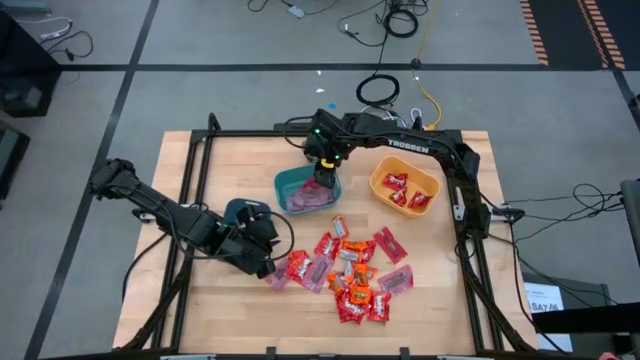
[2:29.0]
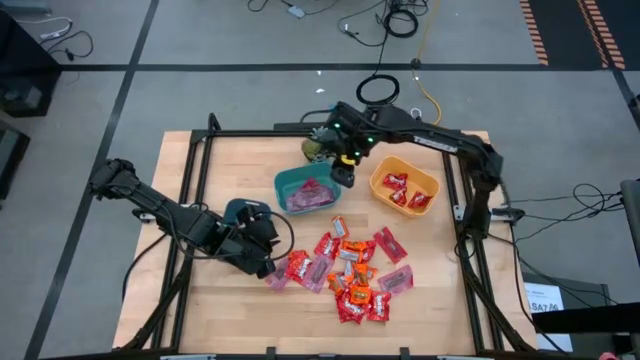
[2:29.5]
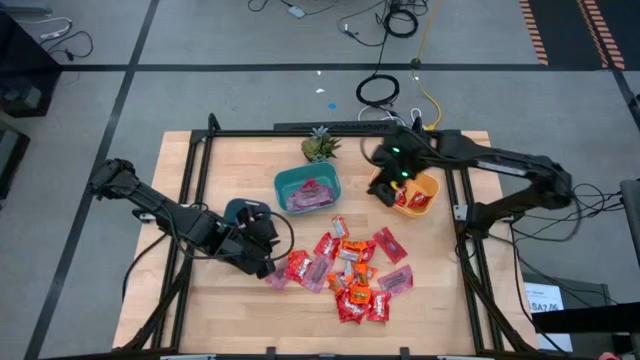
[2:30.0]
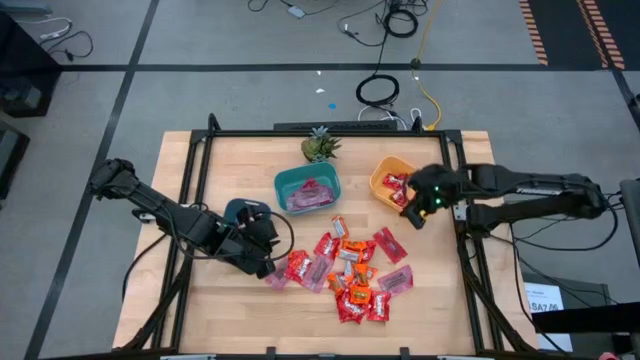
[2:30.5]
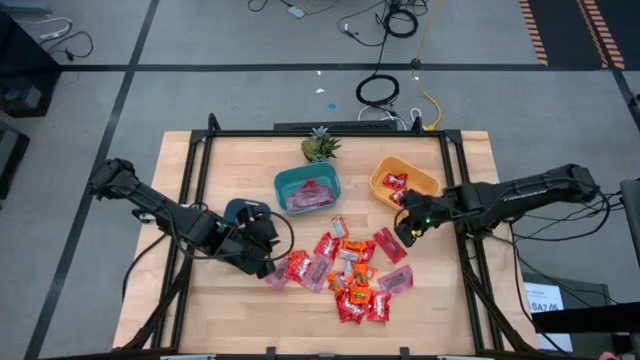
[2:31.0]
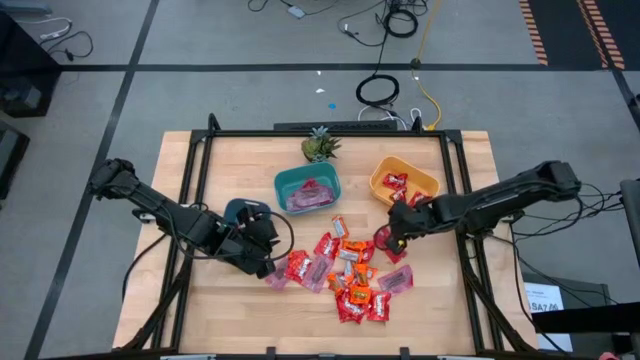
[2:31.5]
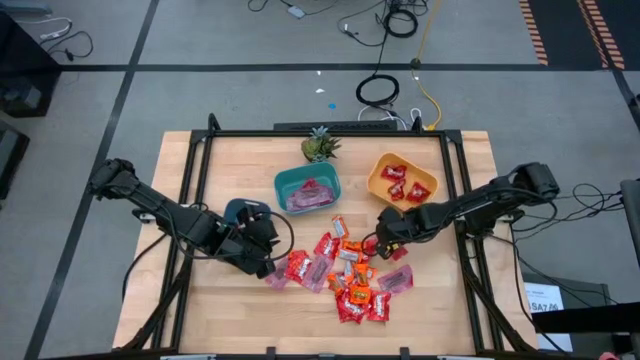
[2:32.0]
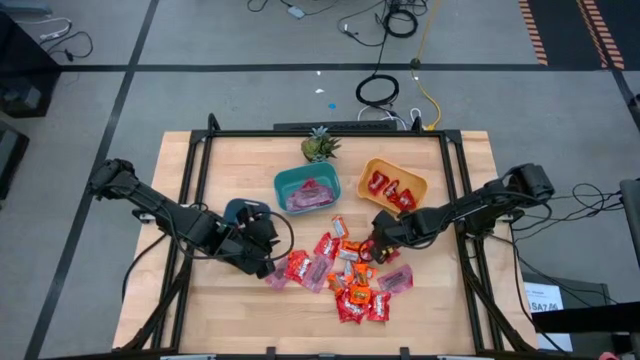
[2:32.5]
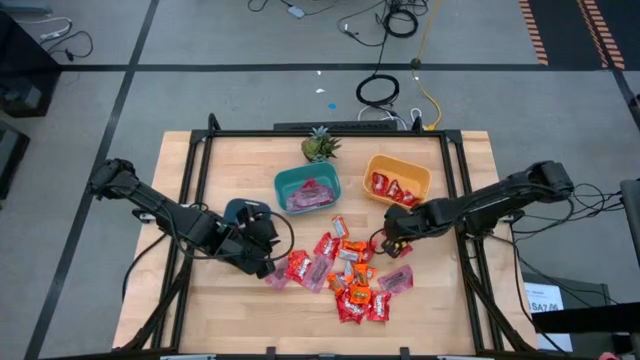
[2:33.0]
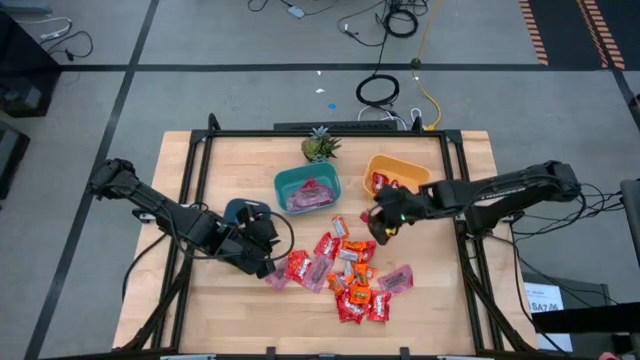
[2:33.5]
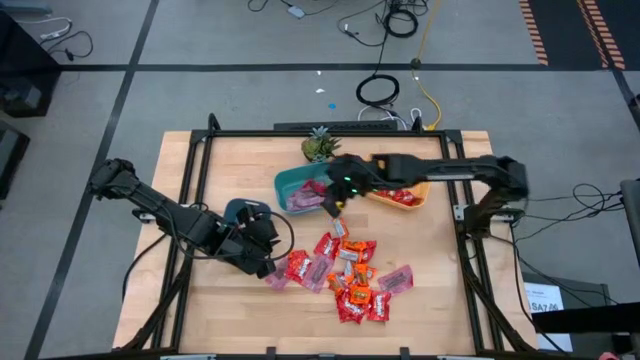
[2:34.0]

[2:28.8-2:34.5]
Task: Sort candy
Put the pink candy into the light blue bin

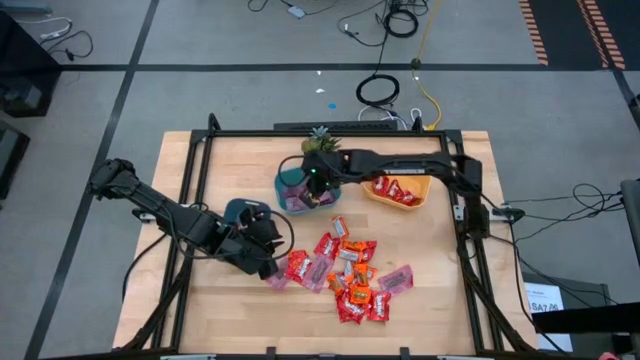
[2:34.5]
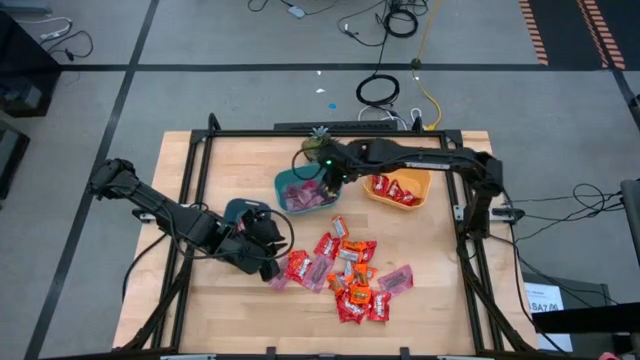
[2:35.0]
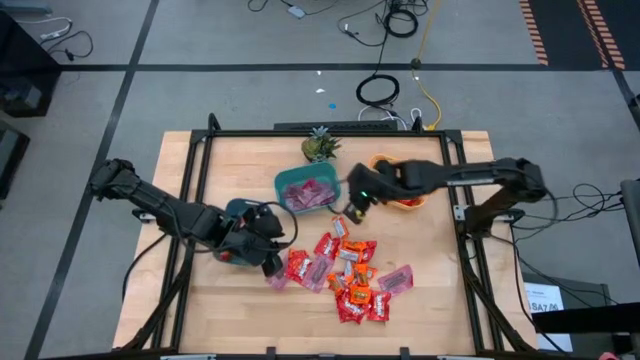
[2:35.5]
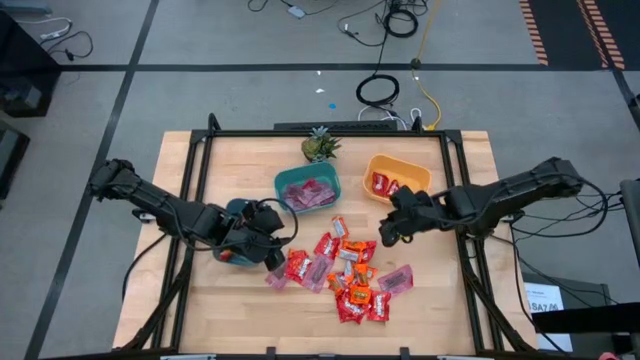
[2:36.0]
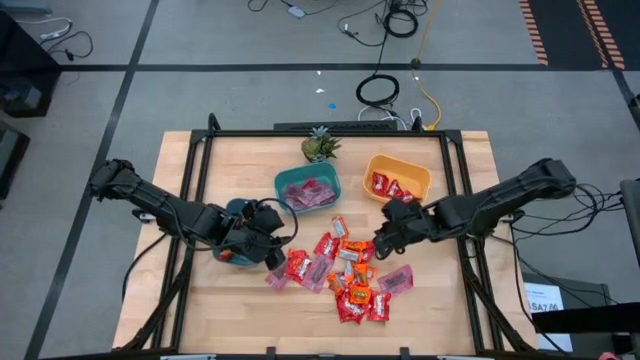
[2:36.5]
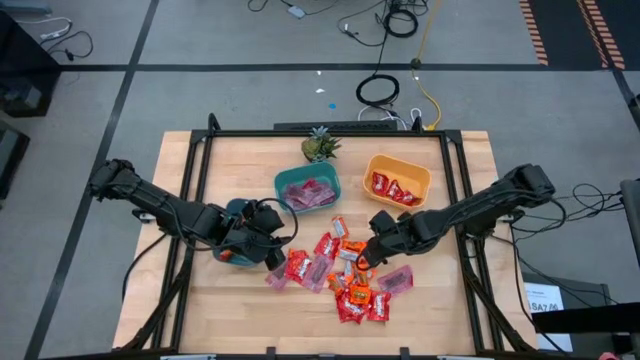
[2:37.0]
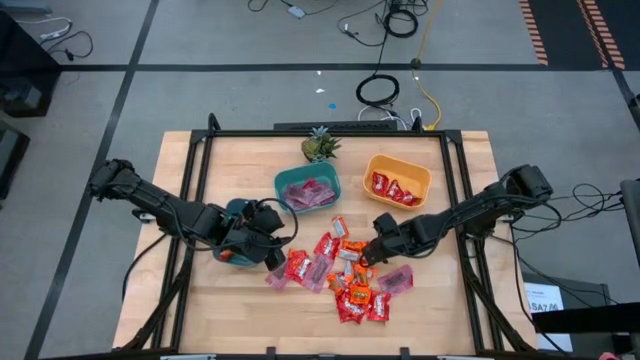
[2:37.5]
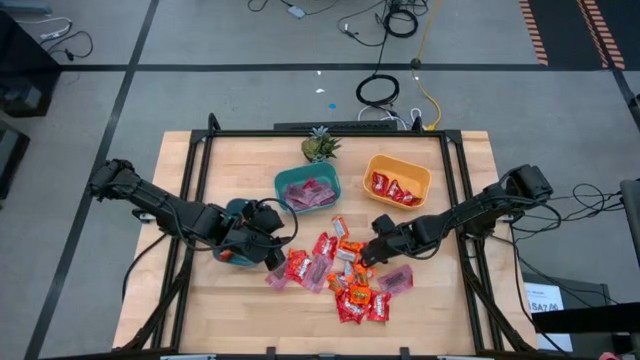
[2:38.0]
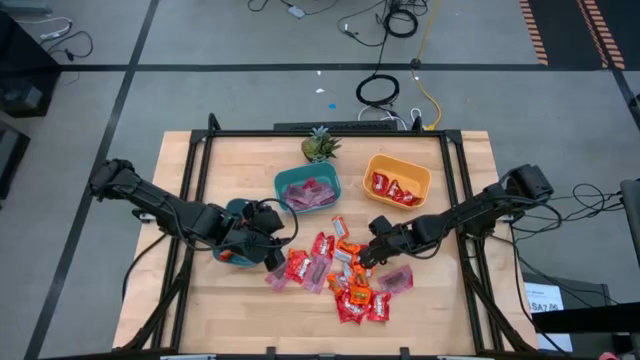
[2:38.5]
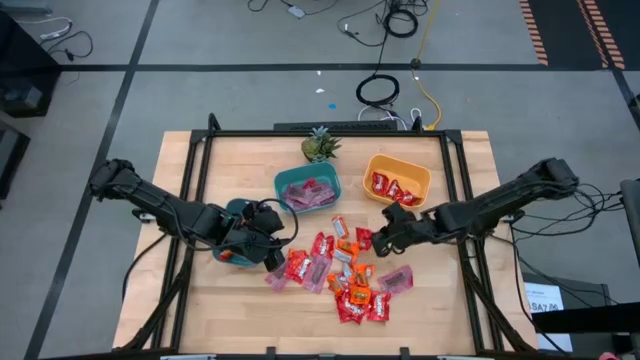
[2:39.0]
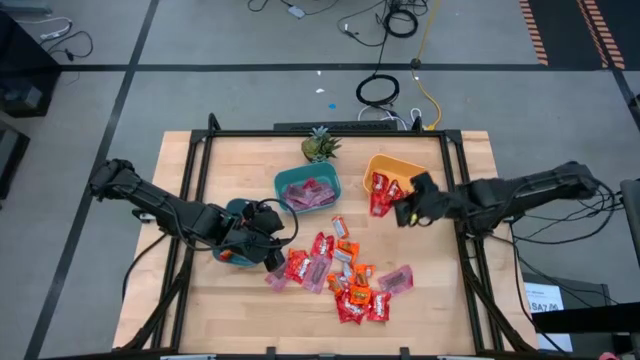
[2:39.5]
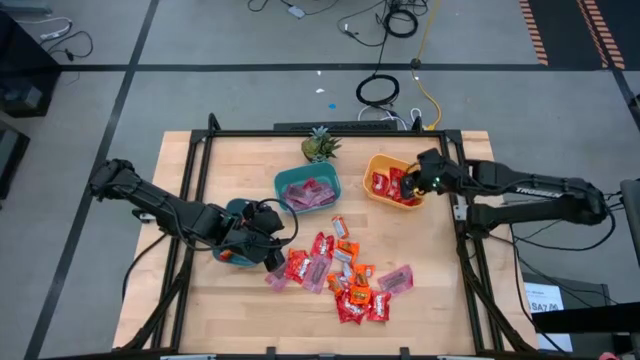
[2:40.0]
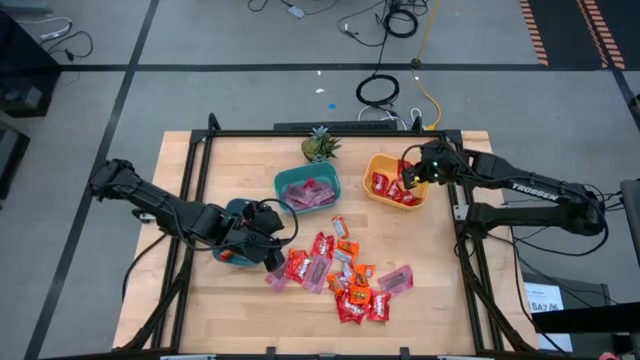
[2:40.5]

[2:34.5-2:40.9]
Put the red candy into the yellow bin

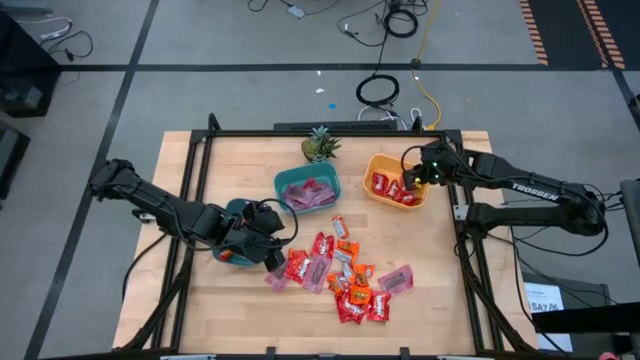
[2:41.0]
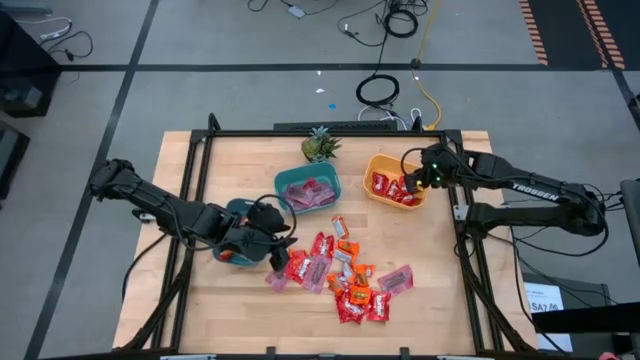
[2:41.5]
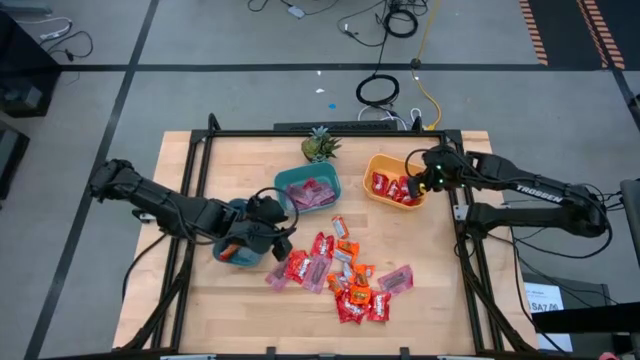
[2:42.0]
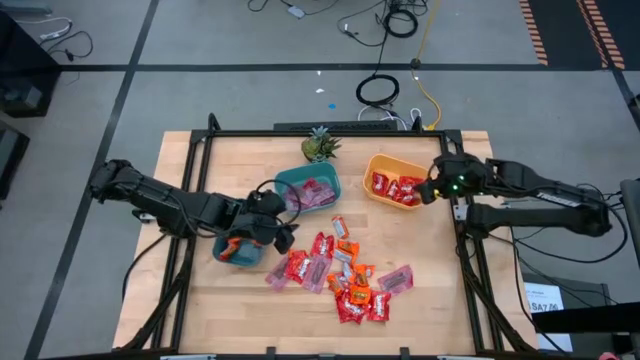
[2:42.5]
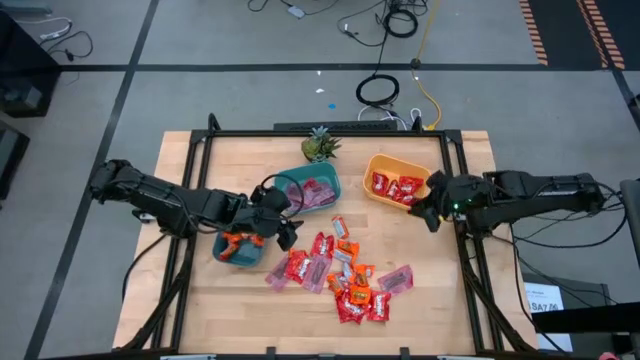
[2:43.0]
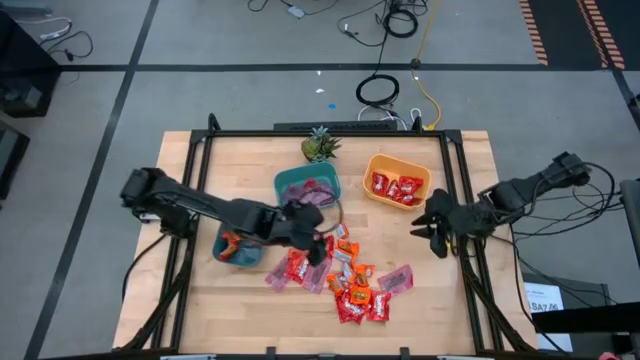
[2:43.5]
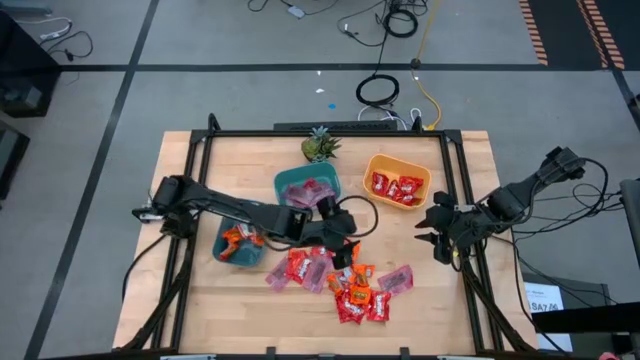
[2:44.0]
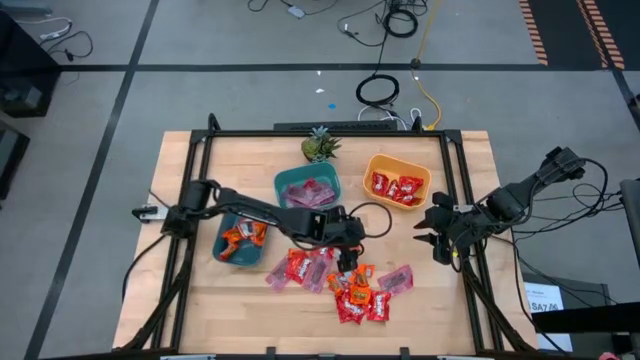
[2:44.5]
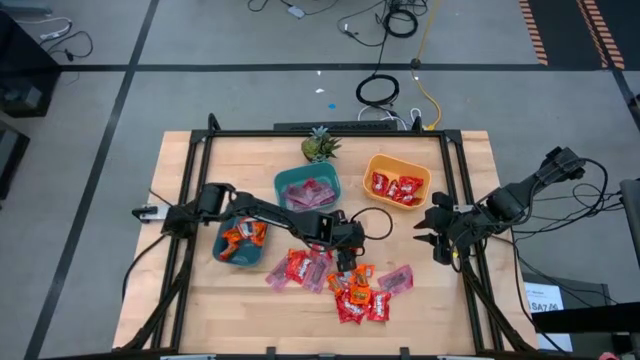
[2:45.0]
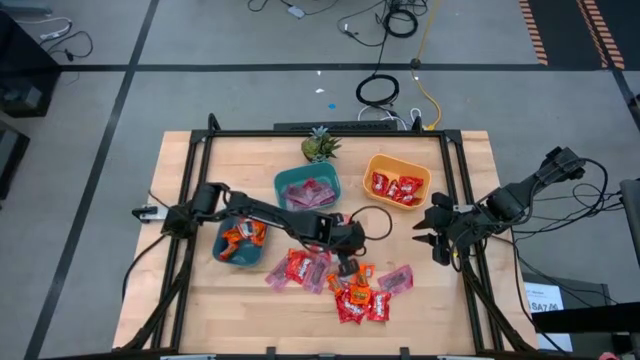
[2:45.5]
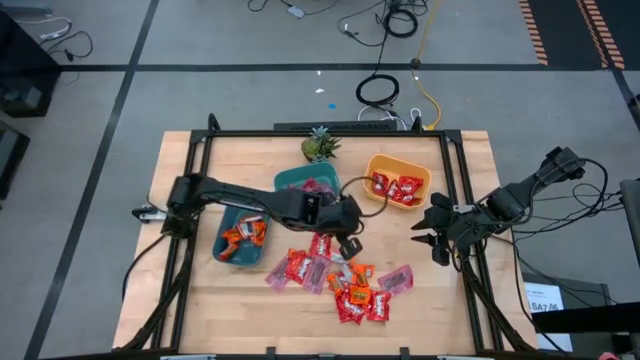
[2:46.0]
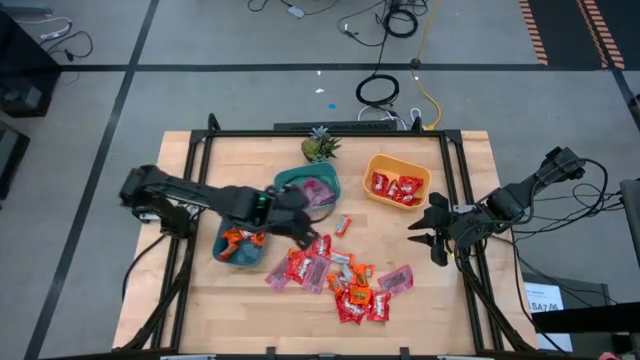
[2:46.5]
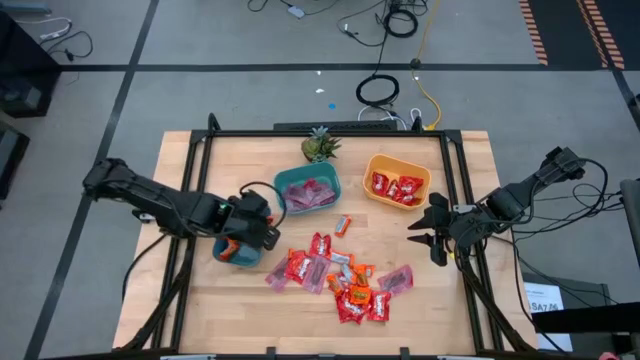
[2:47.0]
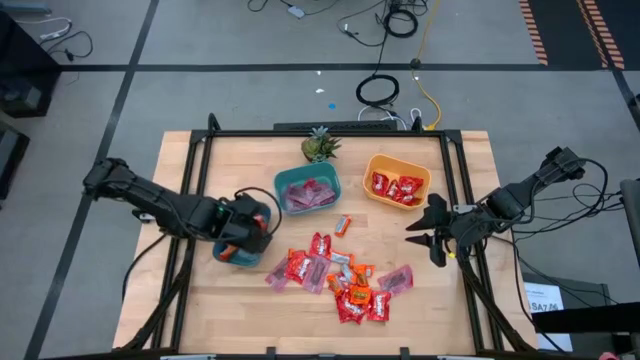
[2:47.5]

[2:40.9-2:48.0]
Put the orange chocolate into the blue bin

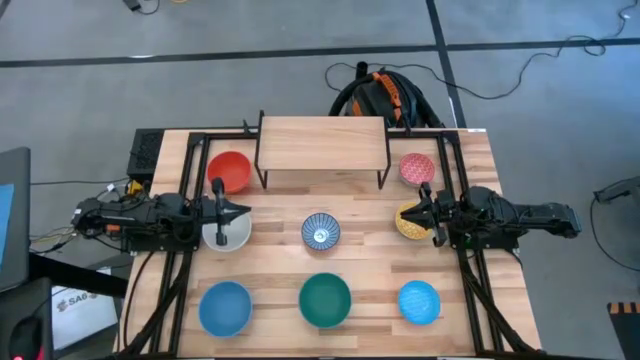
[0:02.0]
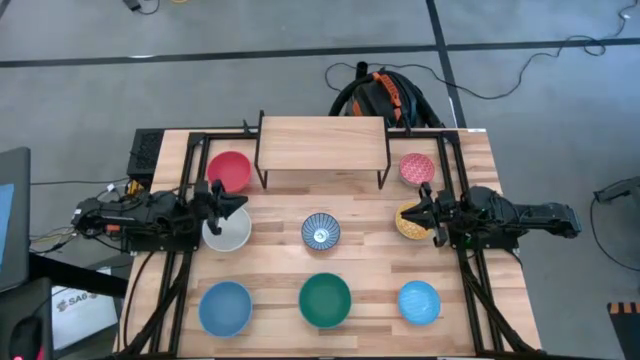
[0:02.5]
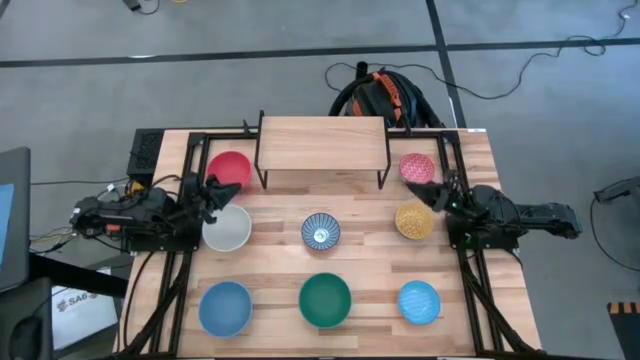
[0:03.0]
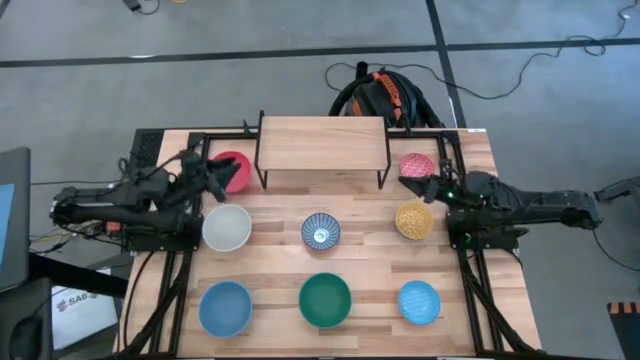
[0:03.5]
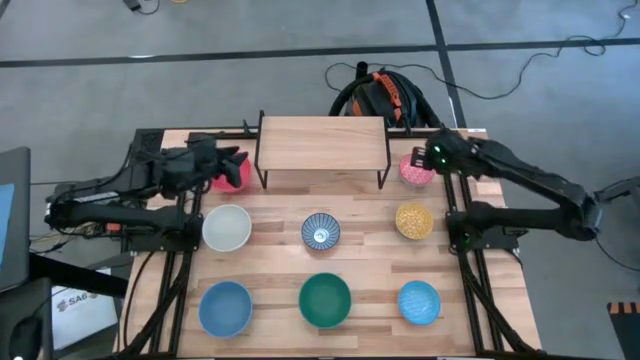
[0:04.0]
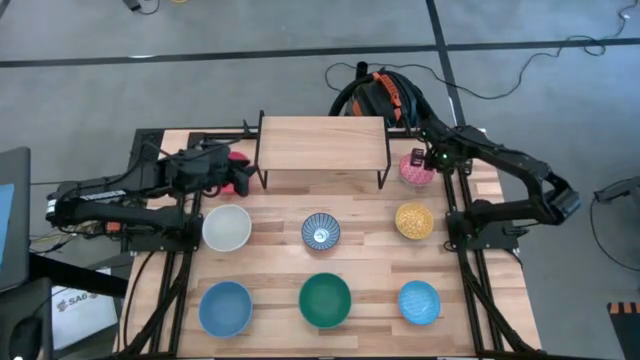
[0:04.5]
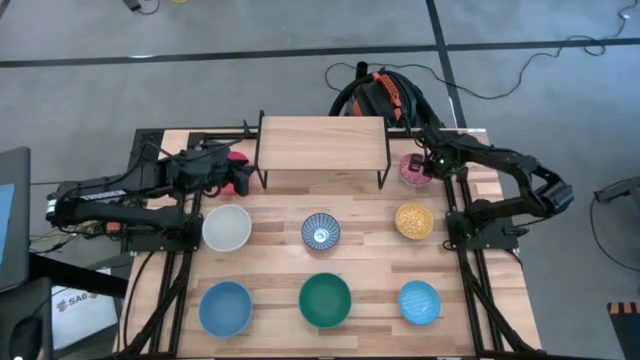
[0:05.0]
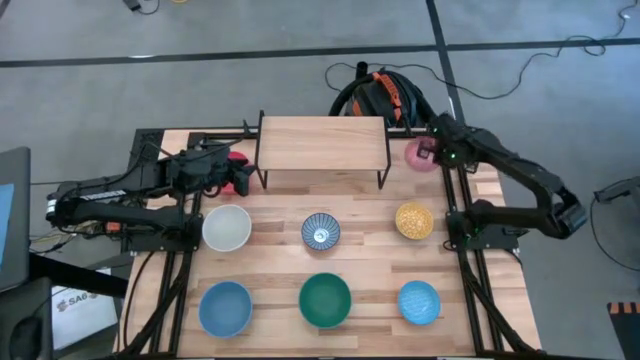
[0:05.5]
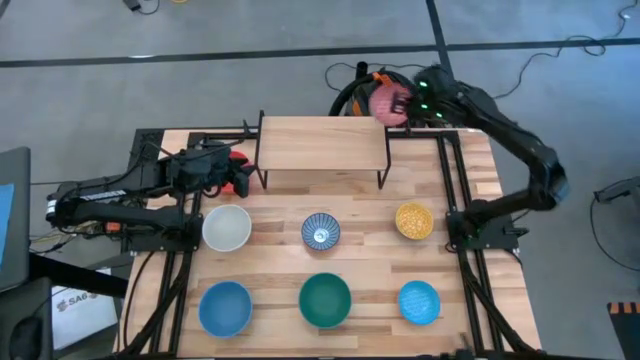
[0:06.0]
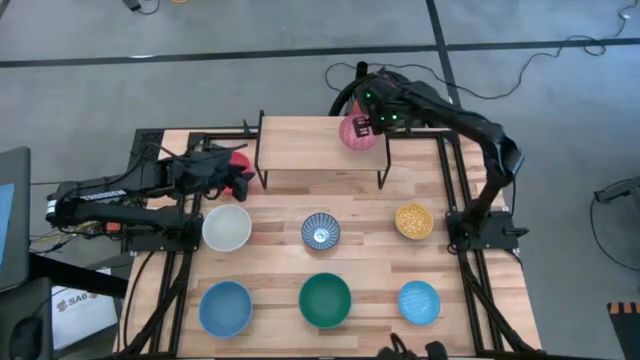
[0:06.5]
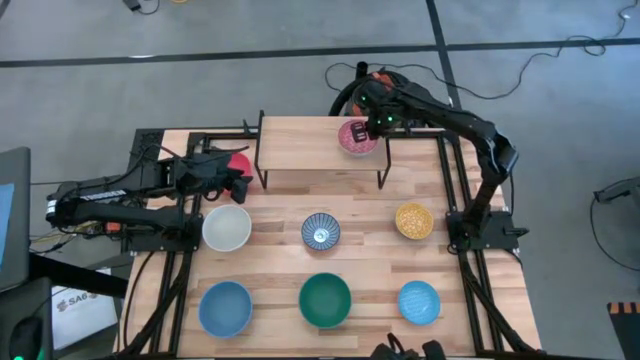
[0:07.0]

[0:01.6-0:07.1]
Task: Place and stack bowls onto a shelf
Put the red patterned bowl on the shelf
